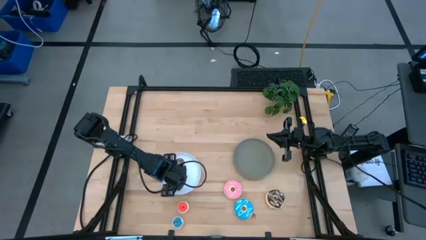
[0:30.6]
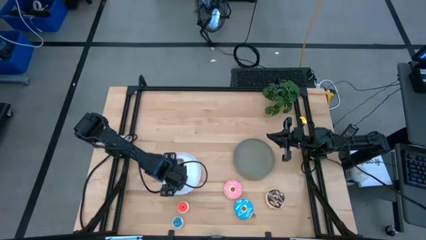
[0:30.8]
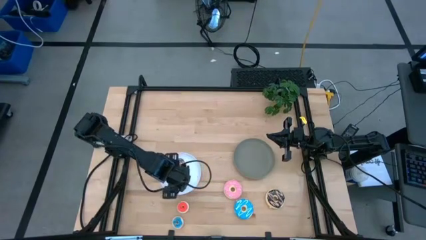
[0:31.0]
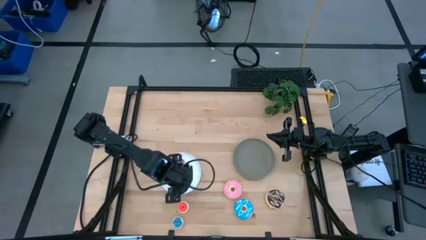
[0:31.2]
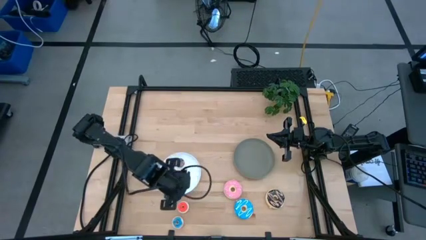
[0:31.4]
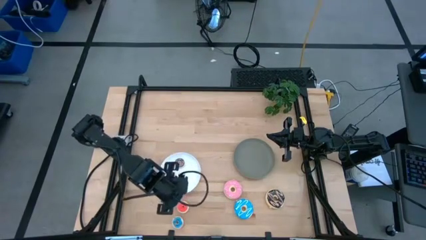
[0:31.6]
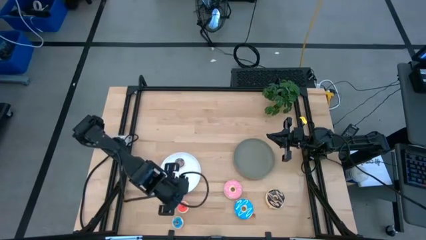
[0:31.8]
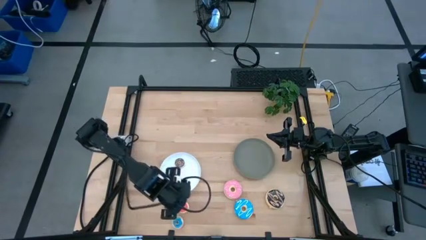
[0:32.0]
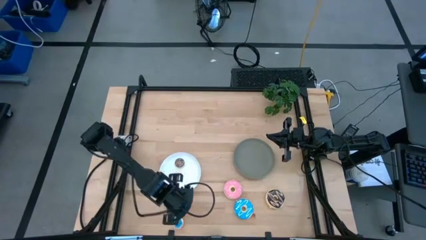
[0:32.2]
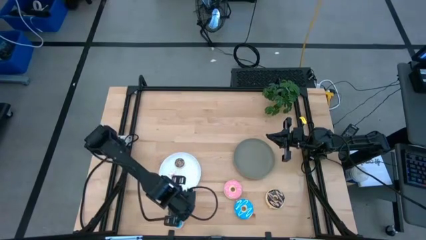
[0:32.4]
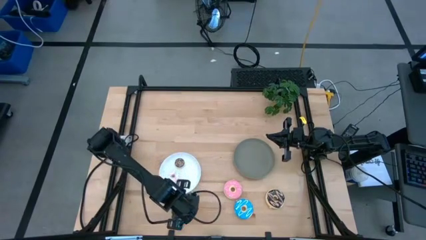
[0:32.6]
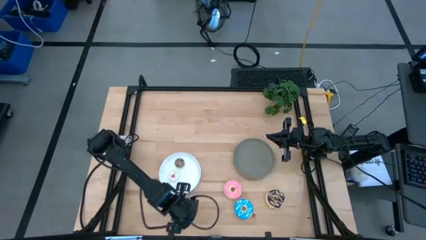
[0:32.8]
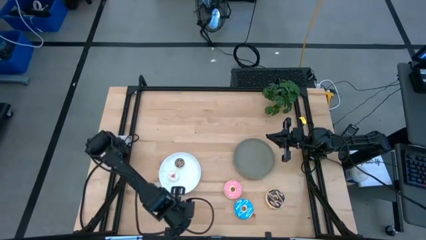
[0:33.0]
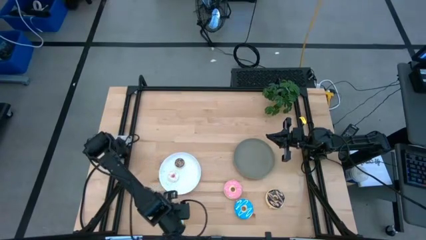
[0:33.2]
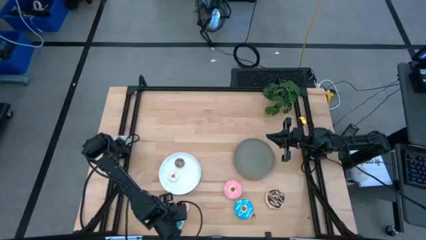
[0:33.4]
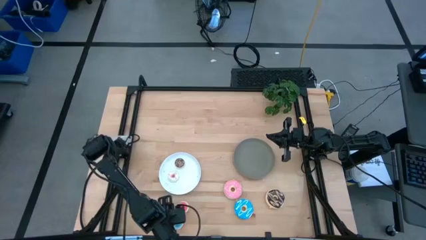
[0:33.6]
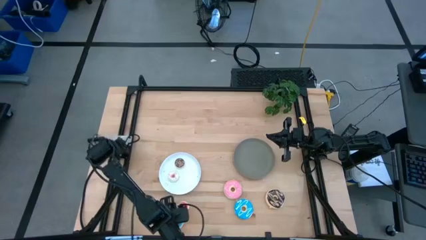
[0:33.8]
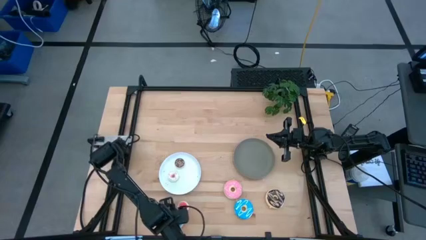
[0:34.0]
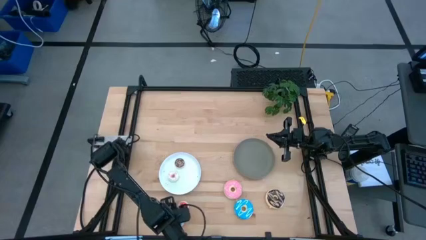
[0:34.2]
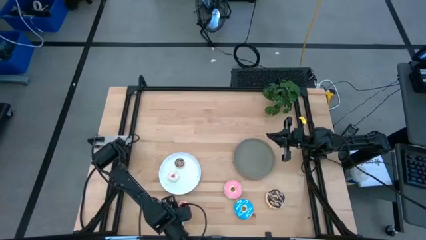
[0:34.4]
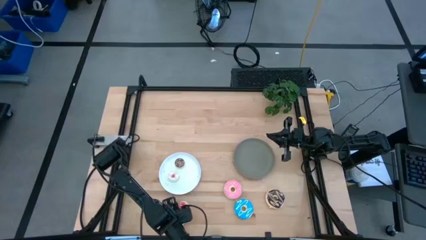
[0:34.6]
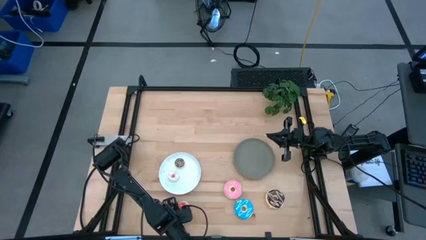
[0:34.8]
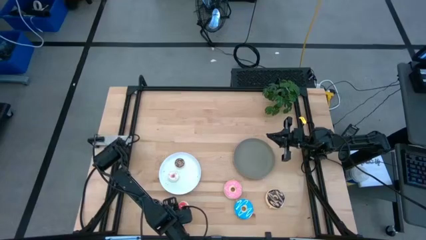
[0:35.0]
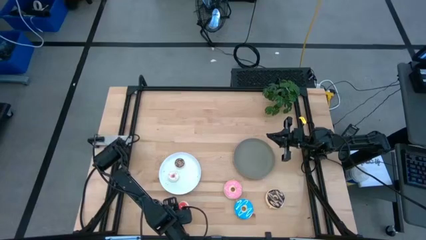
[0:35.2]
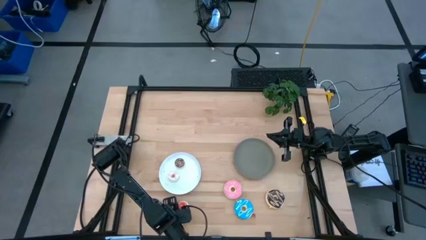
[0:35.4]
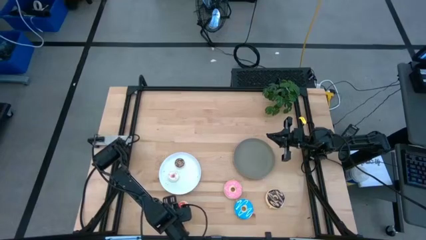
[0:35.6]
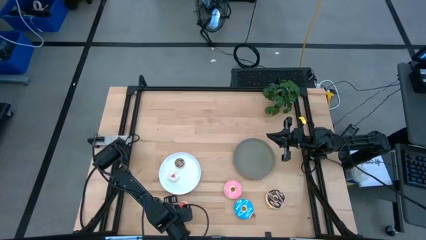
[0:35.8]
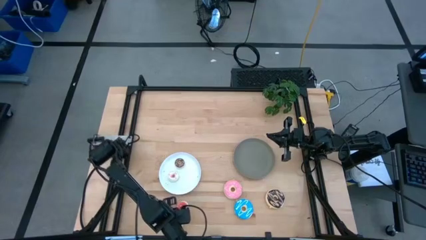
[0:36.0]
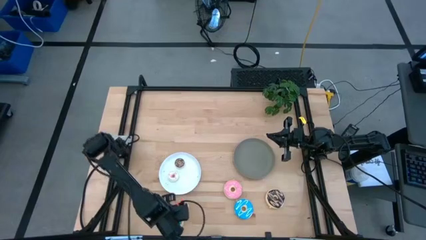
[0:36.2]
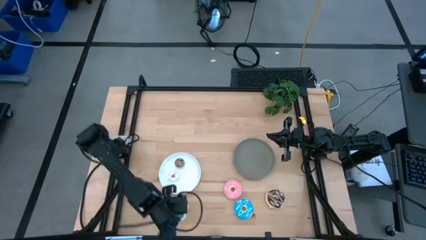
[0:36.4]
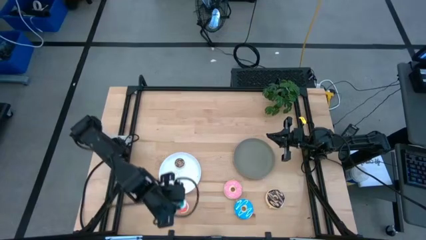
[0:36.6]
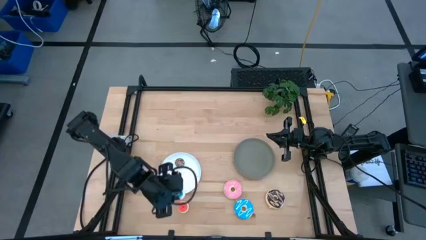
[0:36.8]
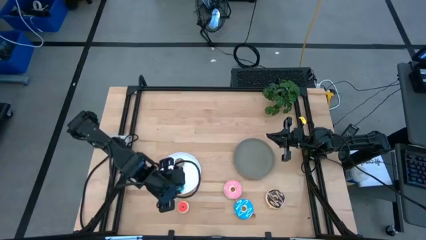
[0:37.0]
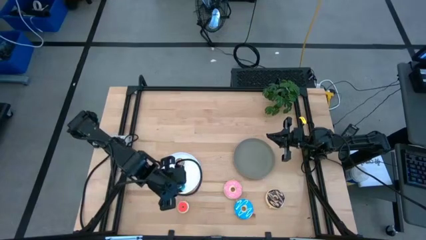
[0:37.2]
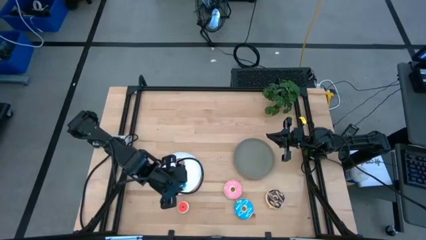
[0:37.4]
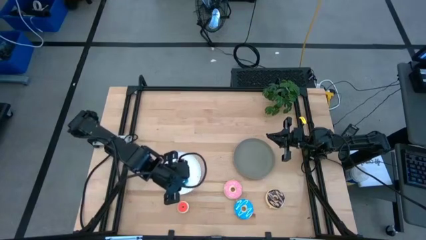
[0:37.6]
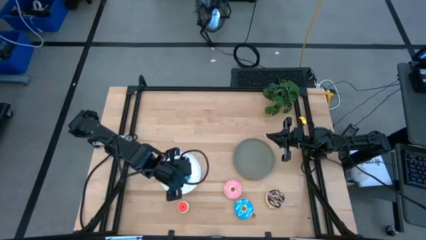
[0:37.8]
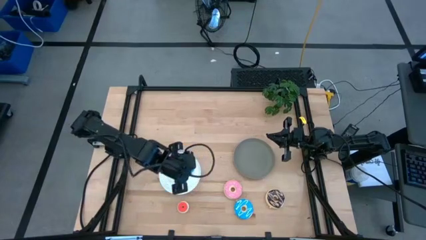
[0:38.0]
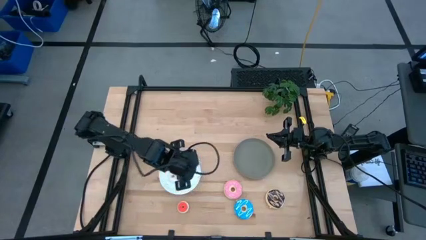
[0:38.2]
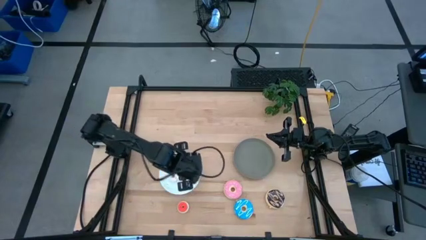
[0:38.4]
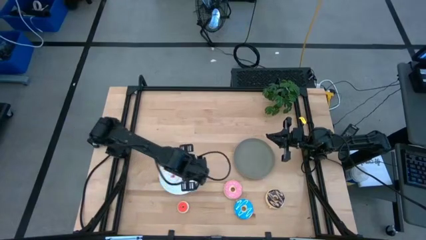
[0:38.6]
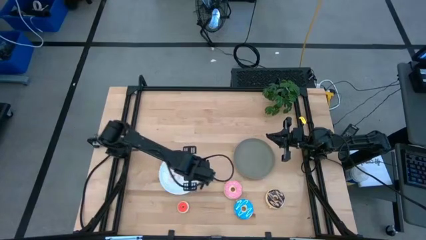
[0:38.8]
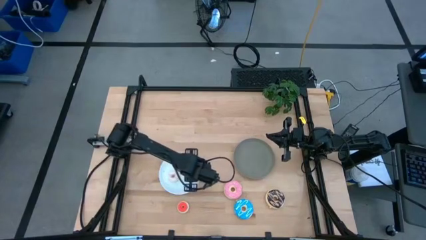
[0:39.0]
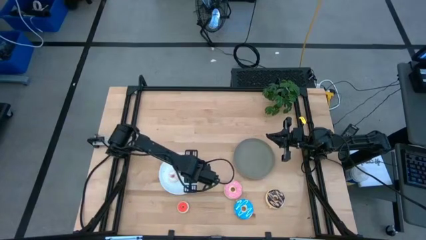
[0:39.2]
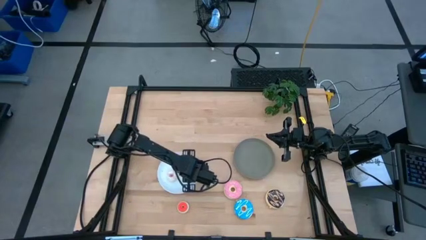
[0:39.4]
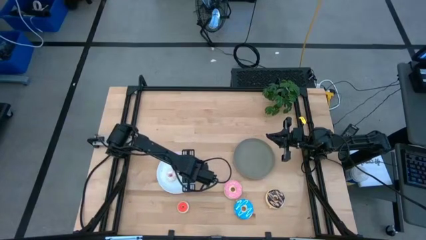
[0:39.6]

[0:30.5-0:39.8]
Task: Pick & Place donuts
Put the small blue donut on the white plate

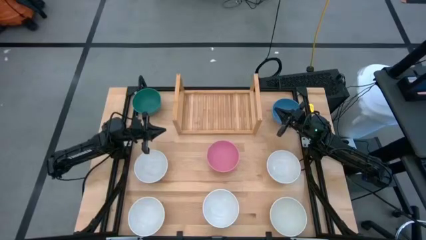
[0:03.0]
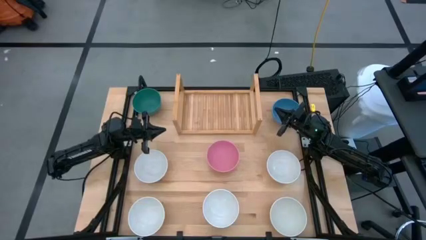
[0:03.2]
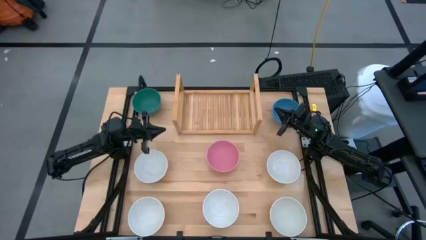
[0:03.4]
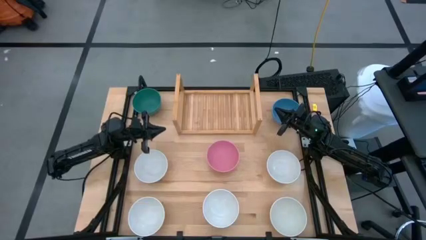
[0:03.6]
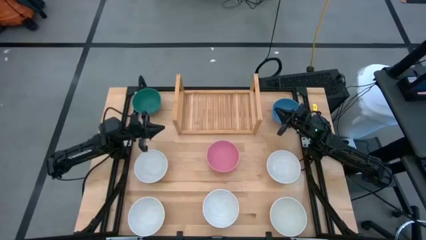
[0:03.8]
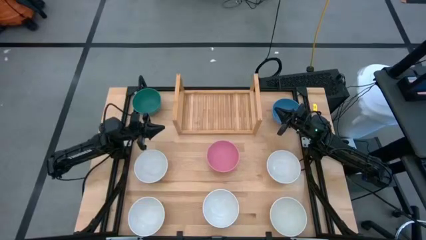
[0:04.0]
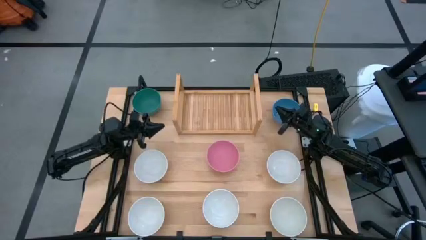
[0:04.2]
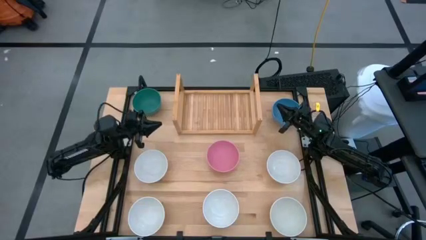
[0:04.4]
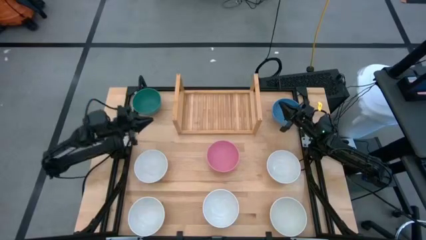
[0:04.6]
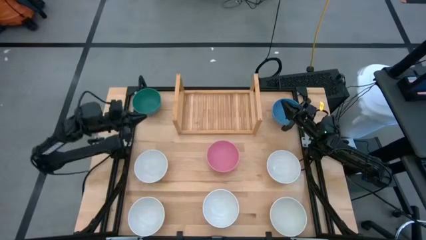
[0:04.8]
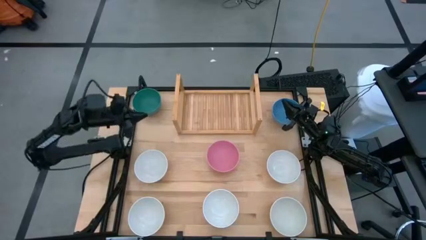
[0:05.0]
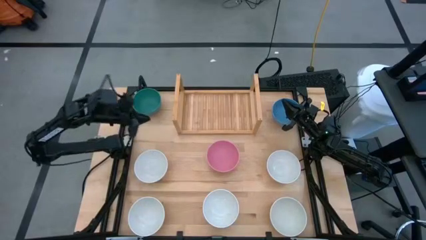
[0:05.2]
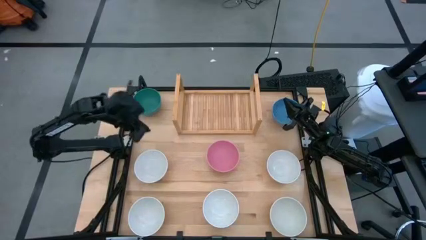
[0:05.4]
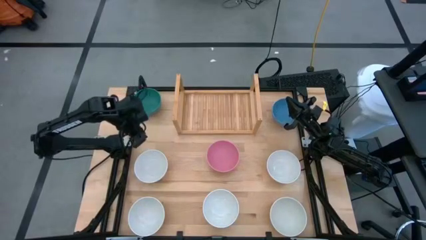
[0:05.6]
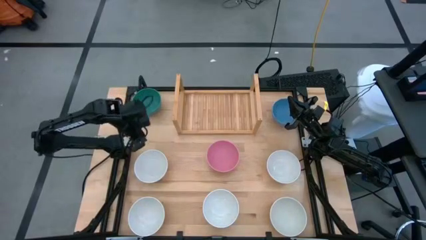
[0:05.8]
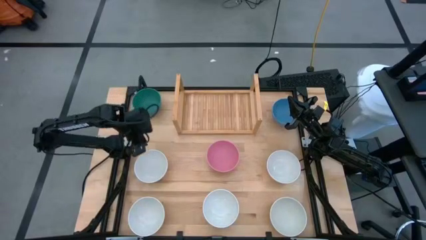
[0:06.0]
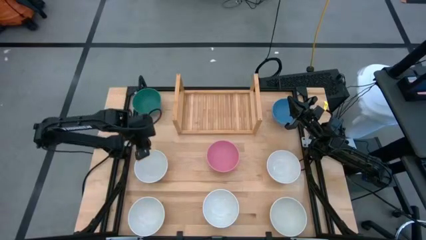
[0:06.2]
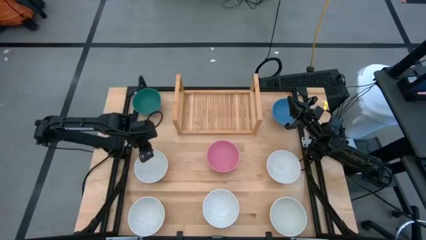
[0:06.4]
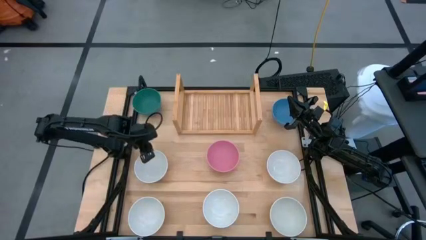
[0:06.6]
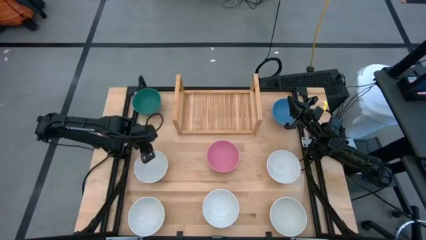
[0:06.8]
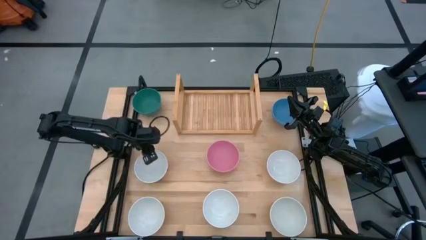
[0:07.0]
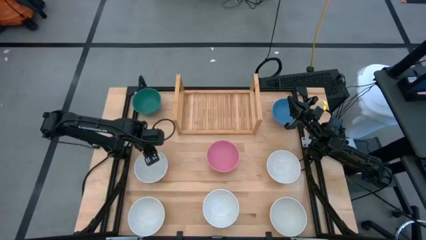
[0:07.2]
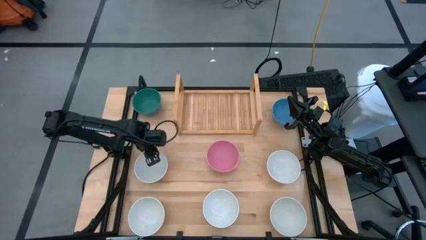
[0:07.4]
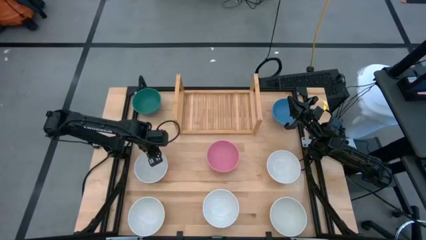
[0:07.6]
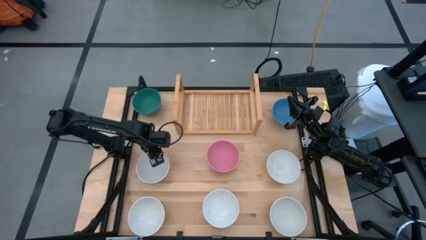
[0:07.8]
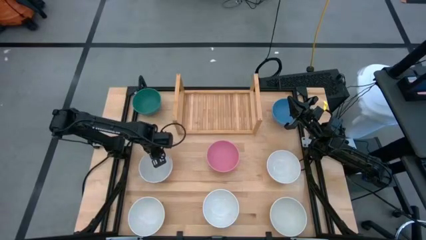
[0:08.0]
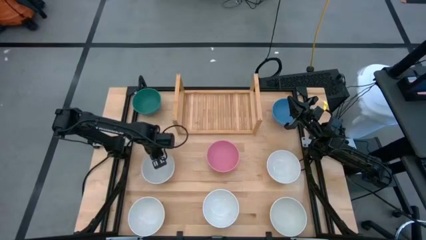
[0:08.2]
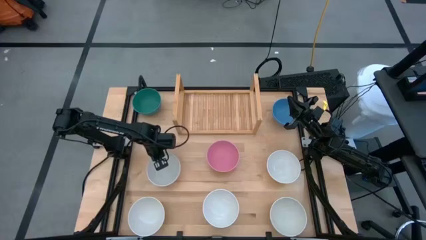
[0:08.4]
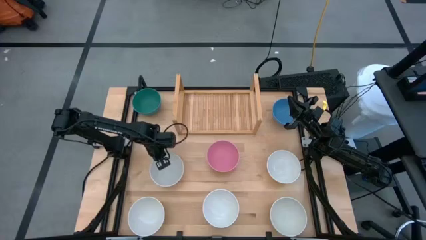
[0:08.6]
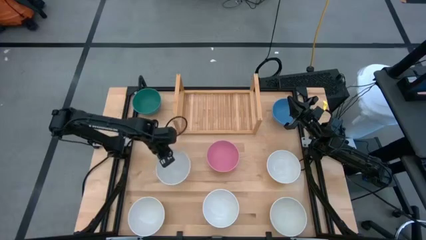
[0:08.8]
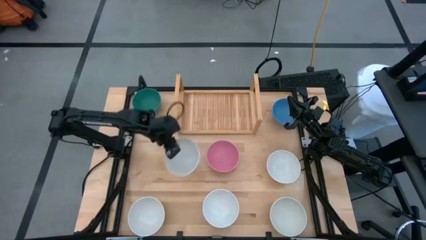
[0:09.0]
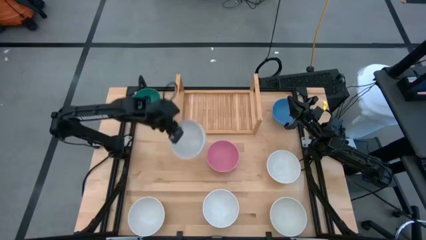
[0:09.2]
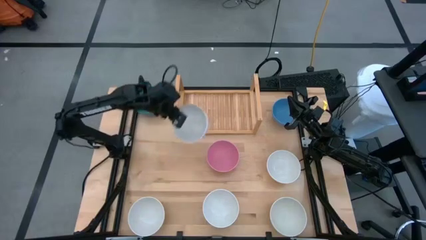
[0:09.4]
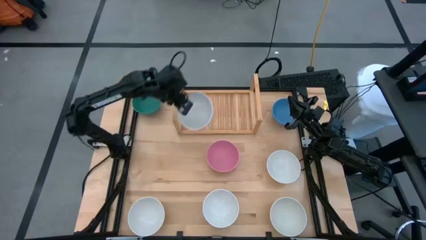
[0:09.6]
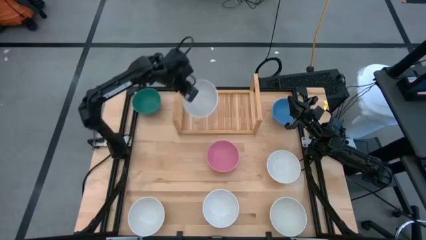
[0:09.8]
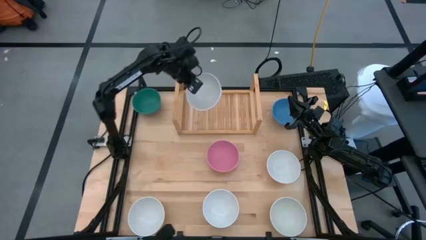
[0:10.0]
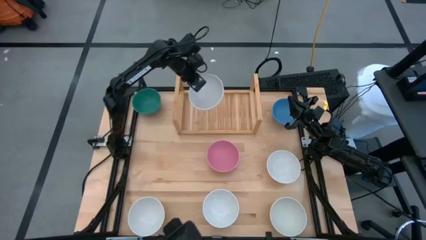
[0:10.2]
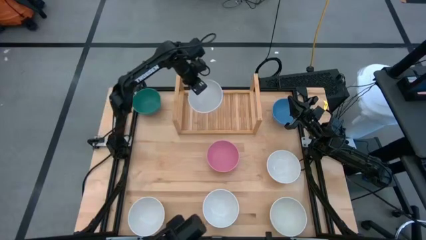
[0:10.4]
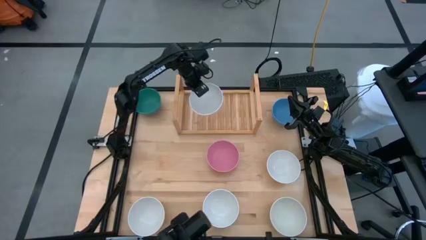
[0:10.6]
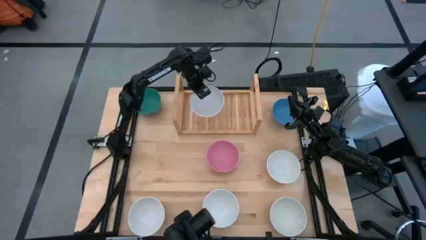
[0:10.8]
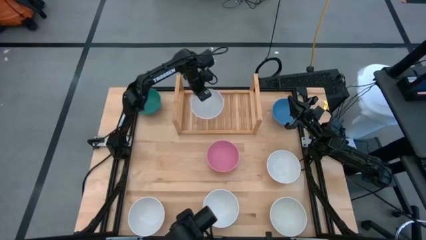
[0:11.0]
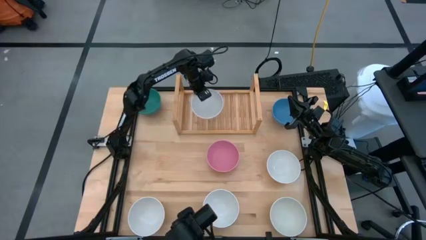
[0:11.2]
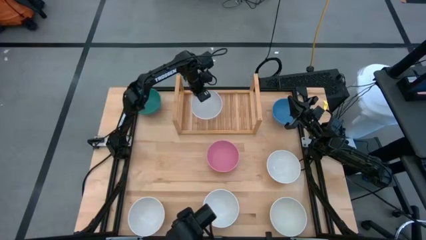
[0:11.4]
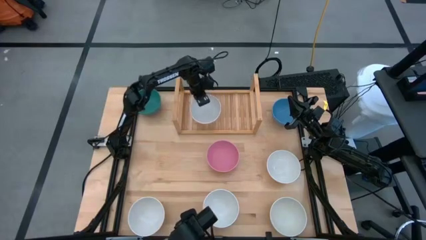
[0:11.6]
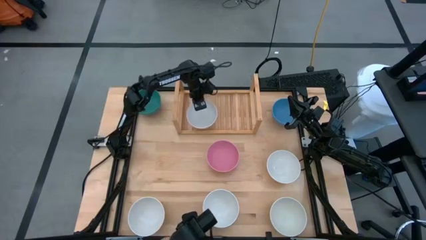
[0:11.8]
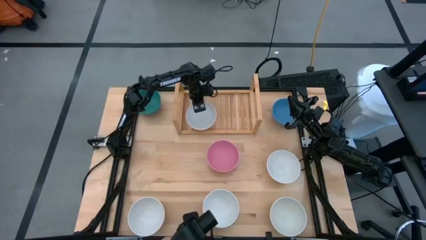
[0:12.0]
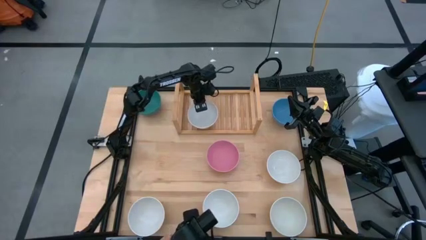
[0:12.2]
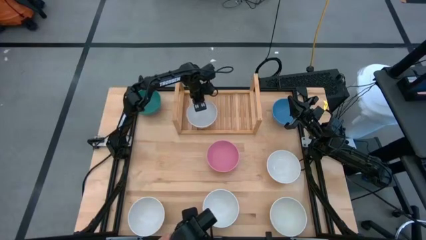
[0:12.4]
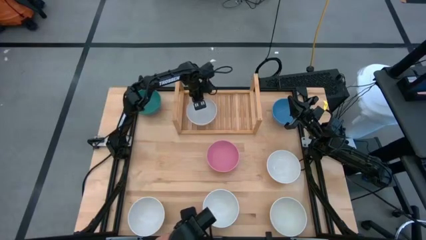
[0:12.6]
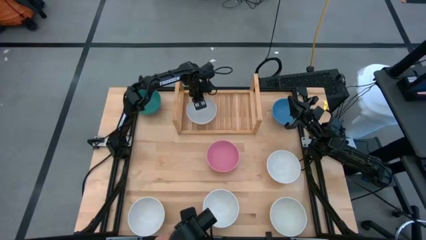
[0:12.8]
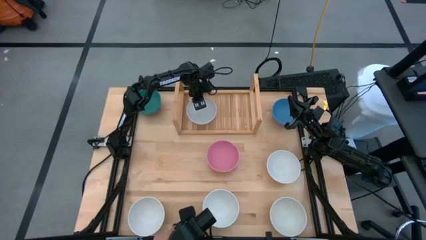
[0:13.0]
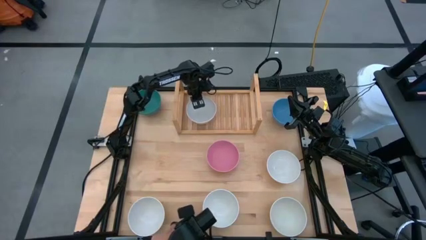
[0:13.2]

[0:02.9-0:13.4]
Task: Place and stack bowls onto a shelf
Put the top left white bowl on the shelf
